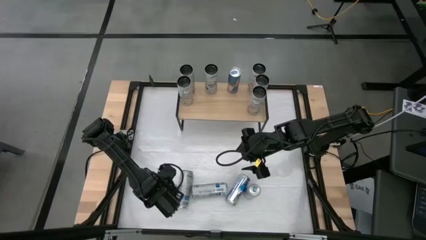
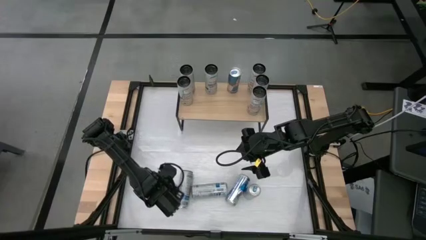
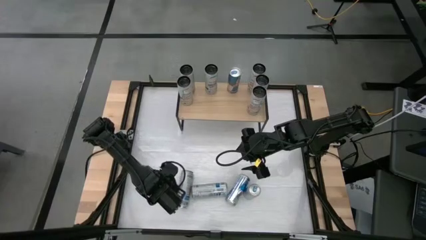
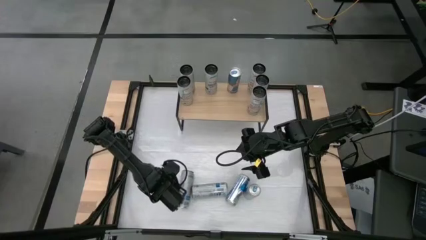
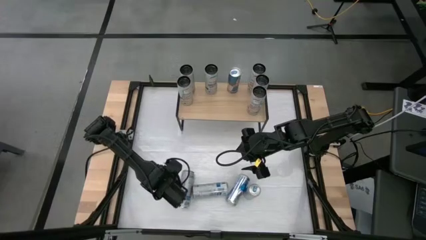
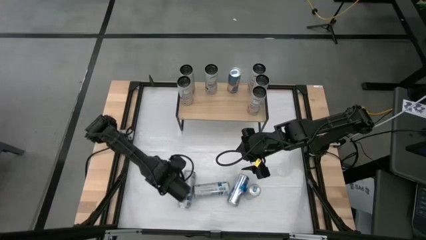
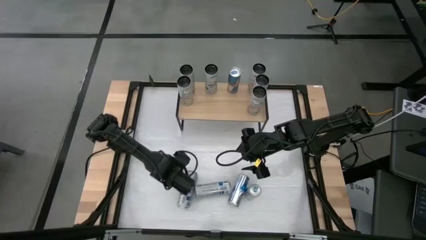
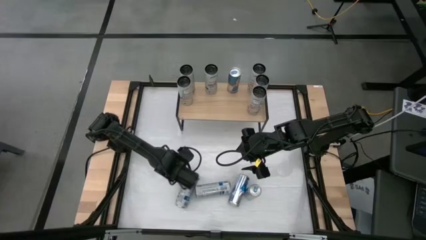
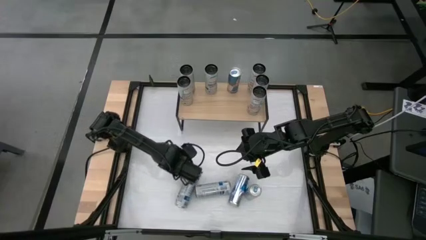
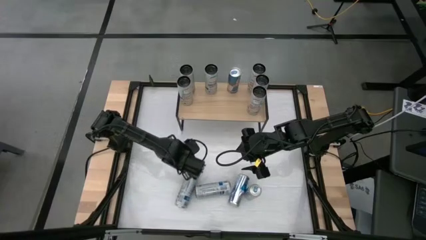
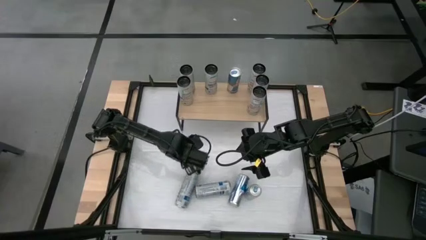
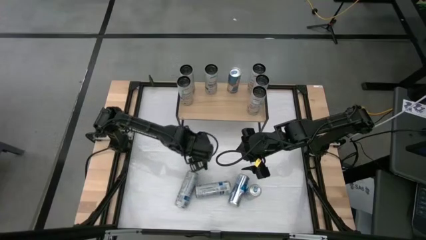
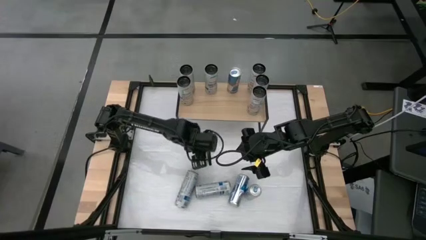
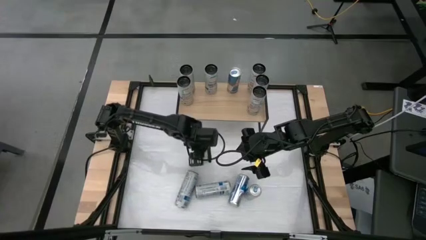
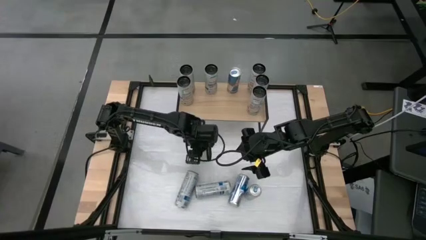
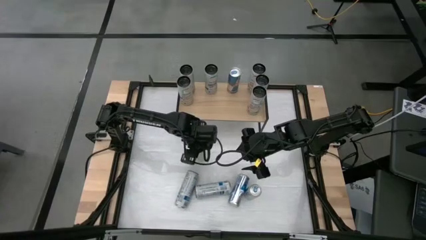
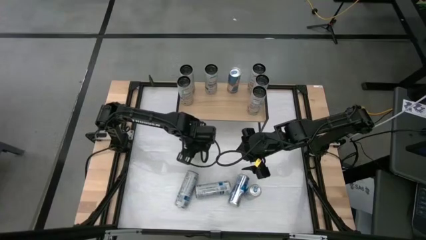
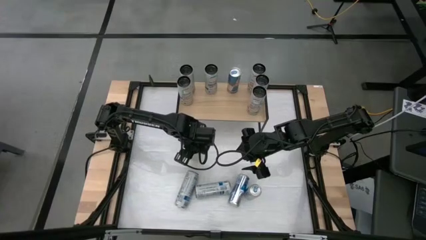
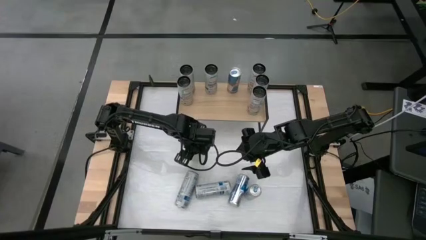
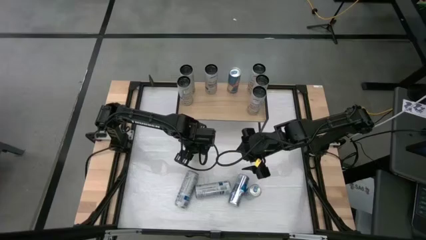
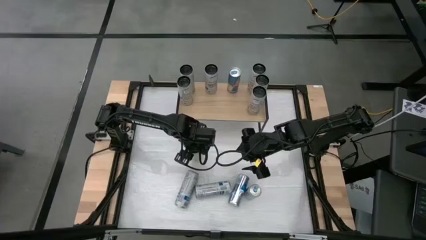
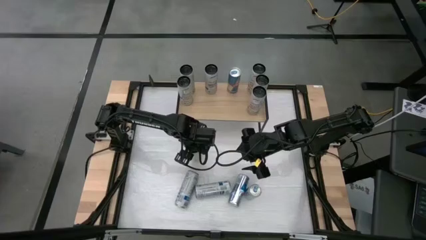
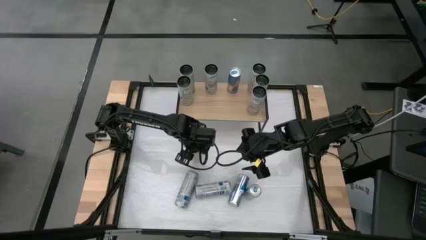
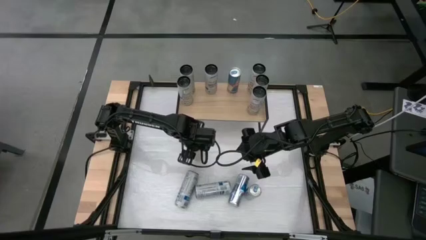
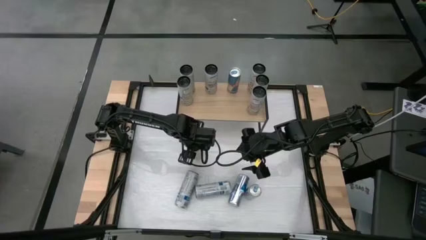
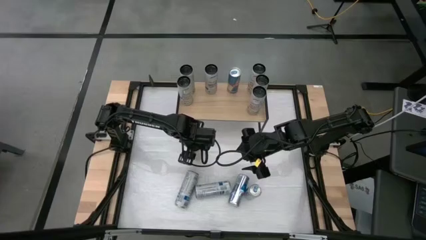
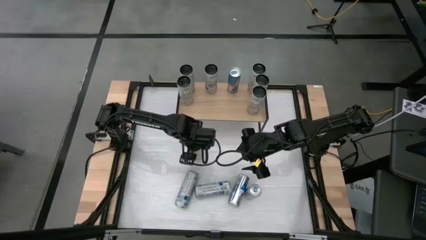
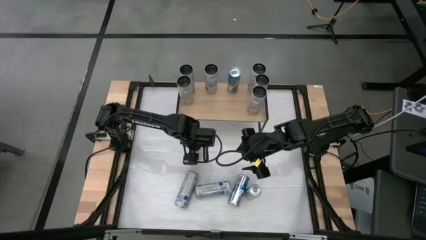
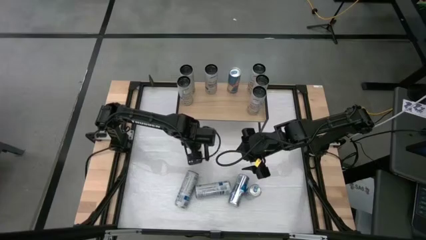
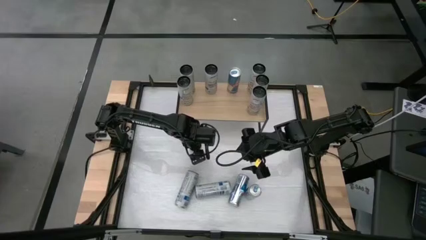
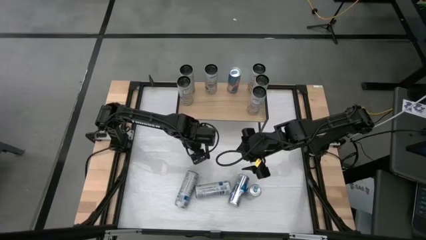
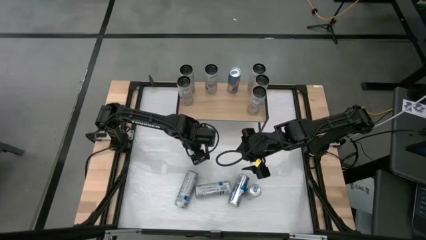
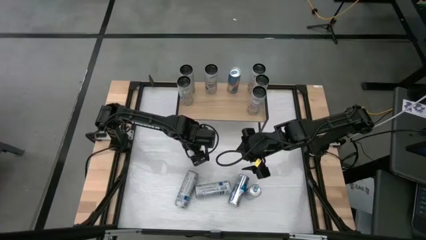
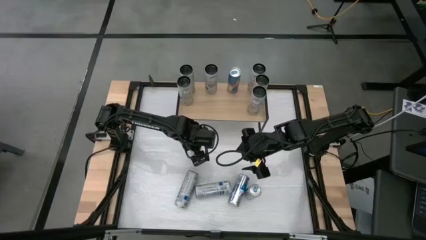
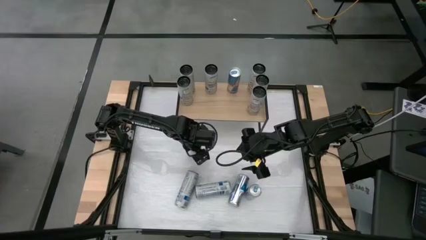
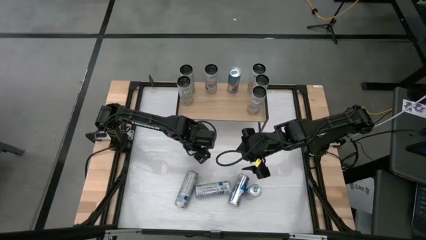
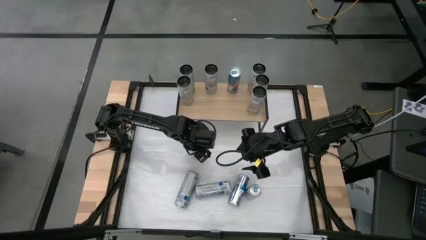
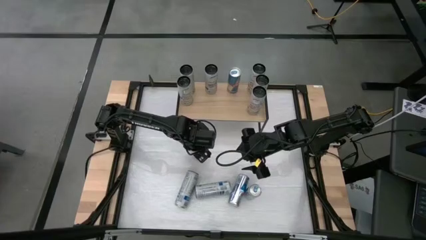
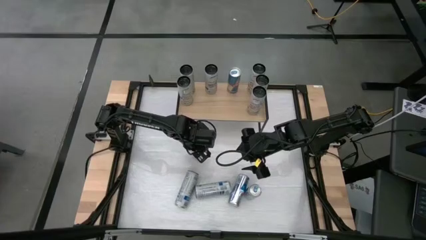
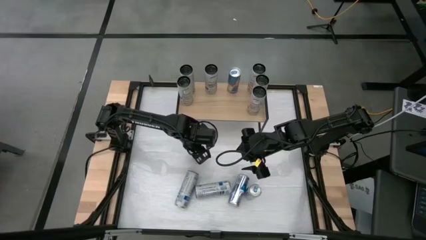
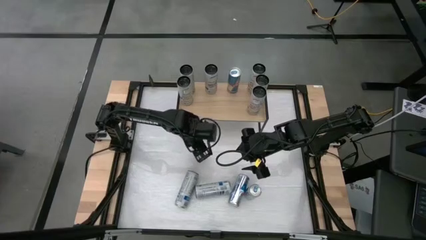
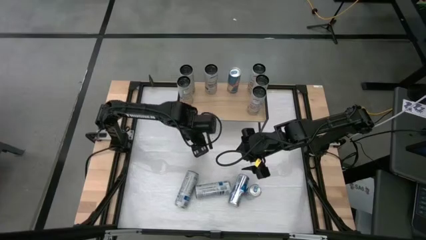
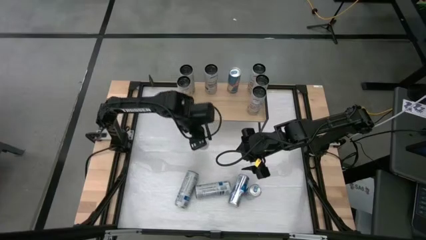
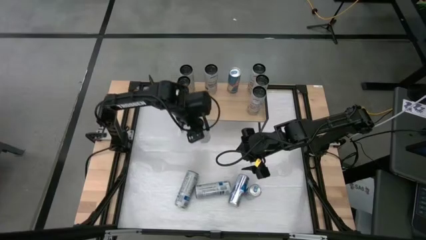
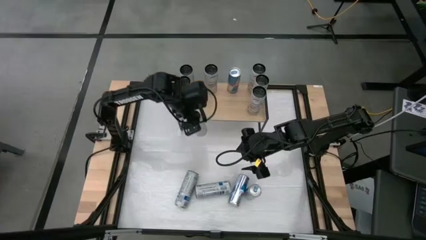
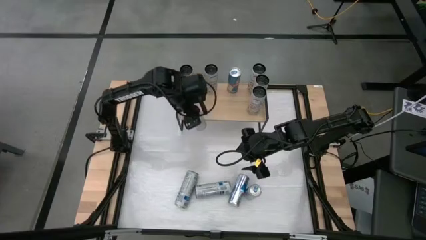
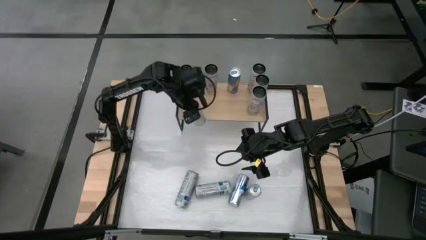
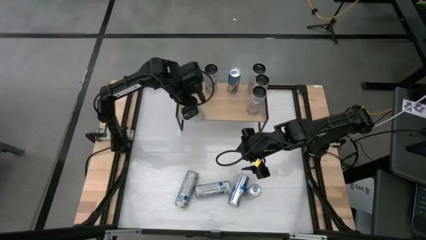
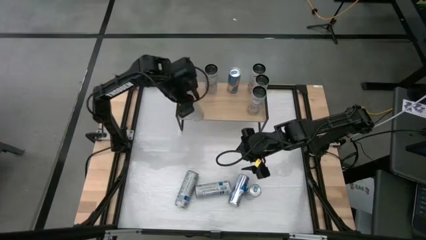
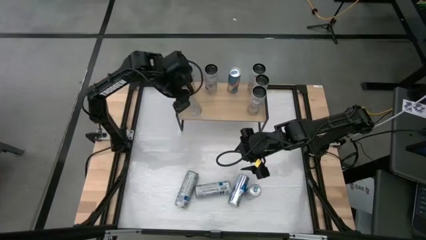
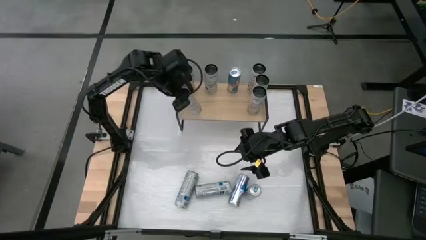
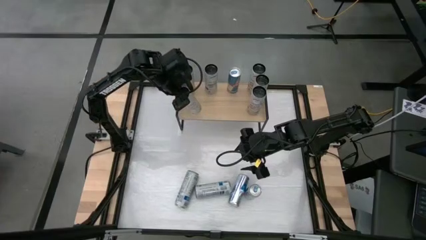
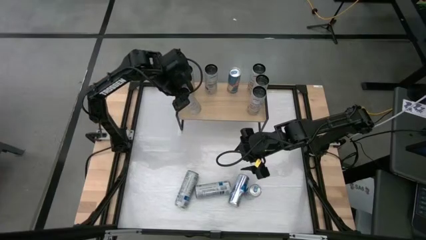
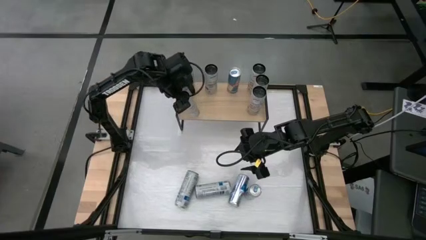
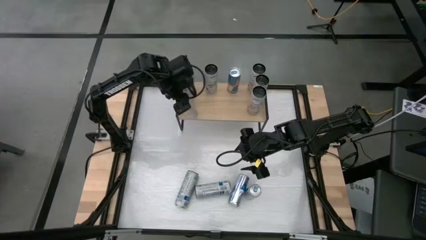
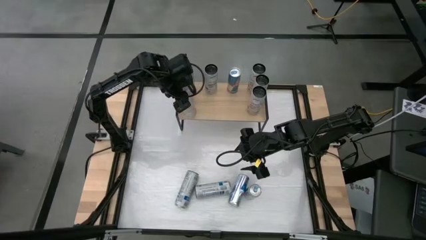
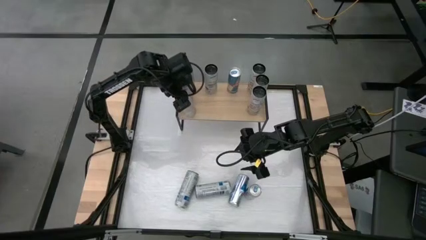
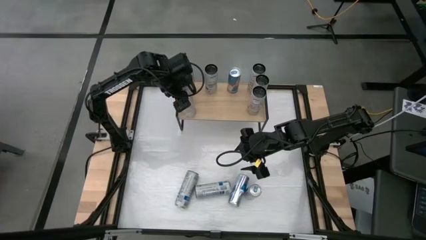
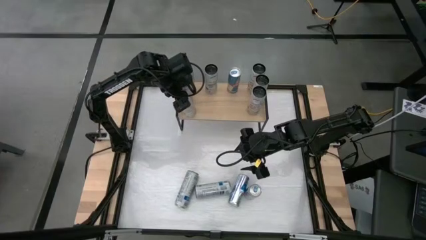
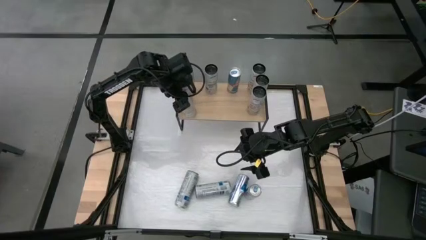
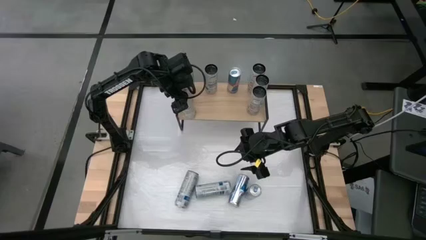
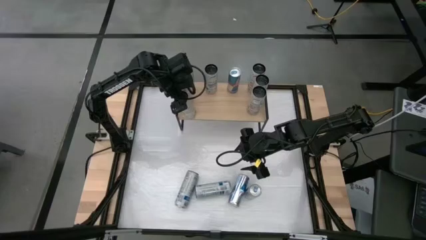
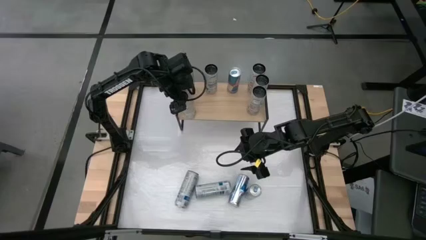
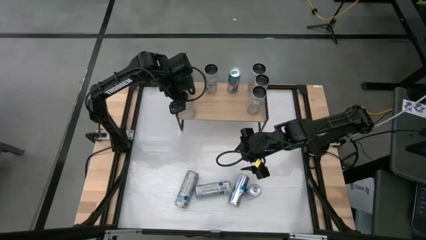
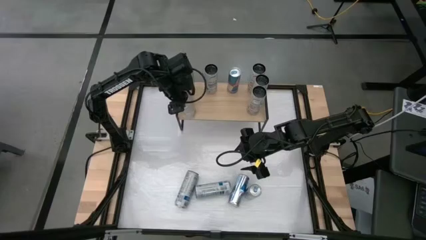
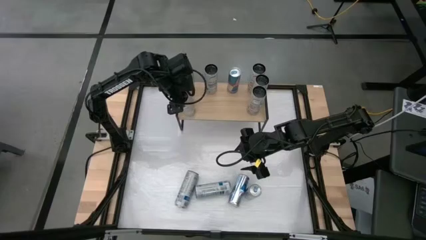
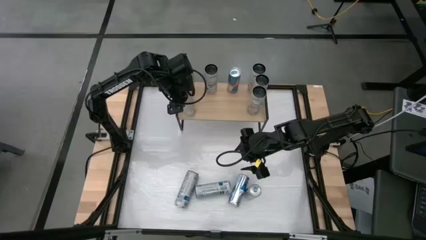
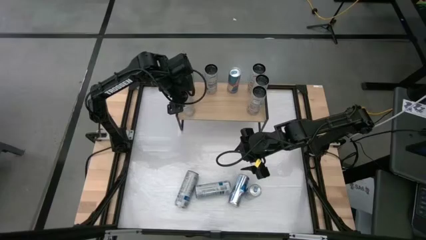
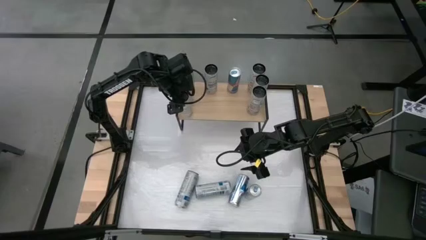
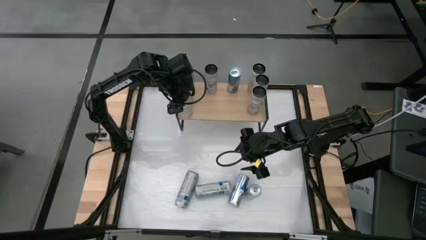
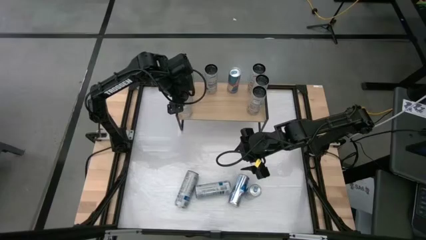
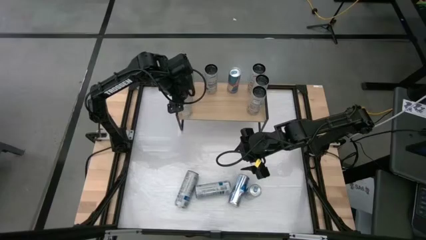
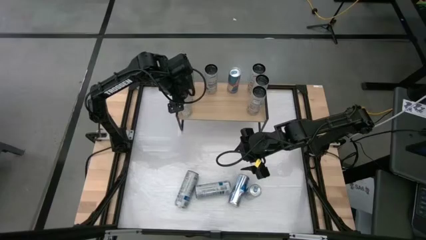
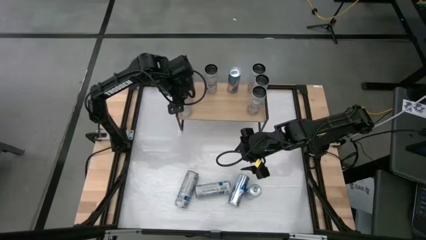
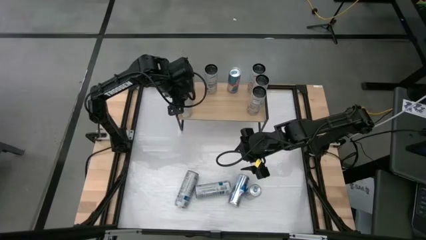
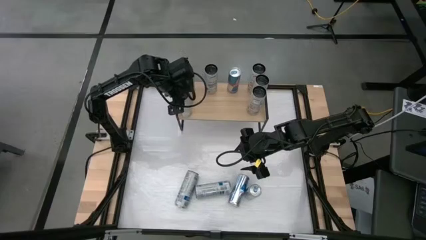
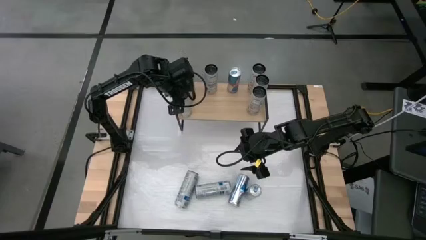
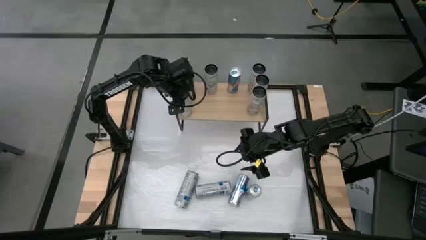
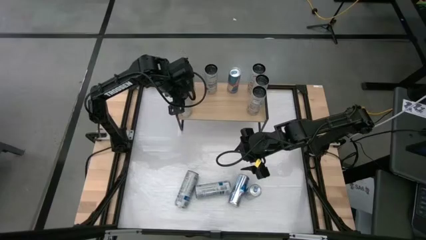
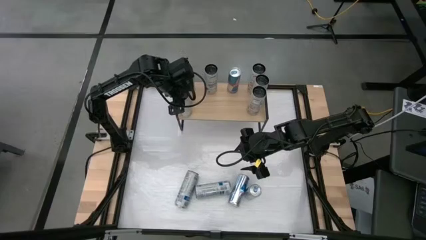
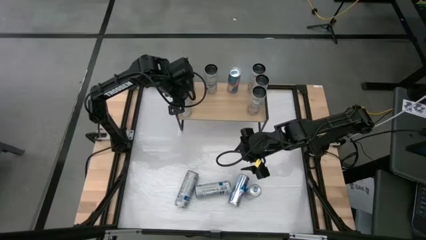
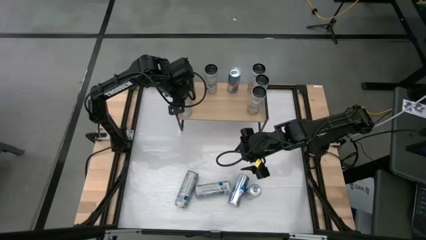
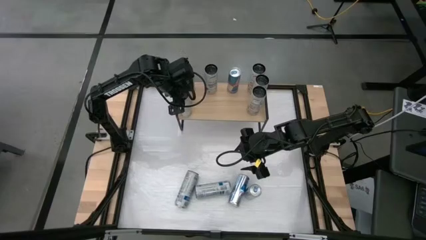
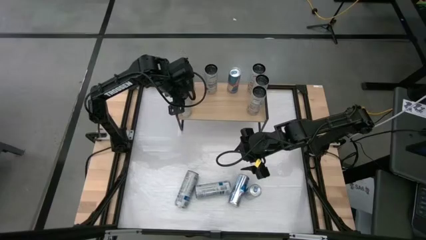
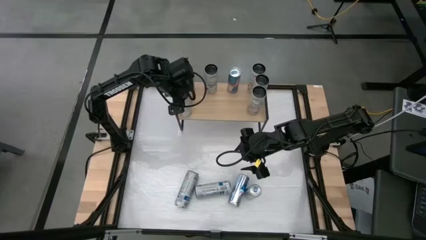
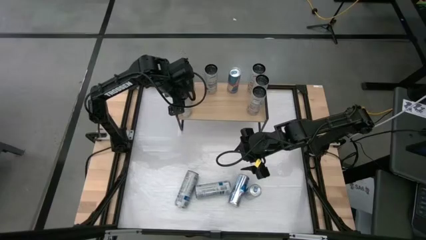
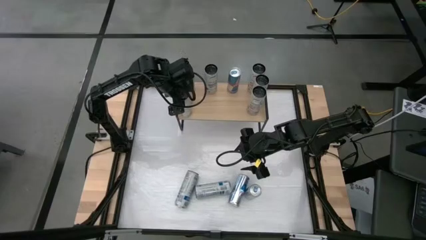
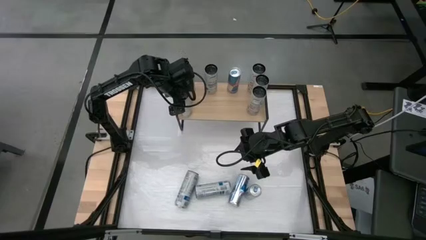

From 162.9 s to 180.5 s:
Task: Sort soda cans
Put the white yellow soda can on the shelf and align with other white yellow soda cans
